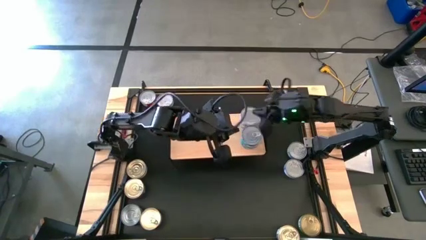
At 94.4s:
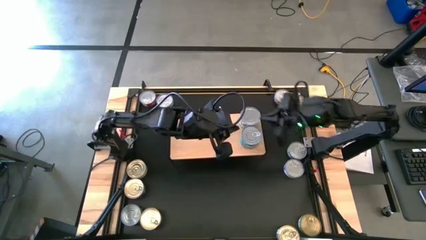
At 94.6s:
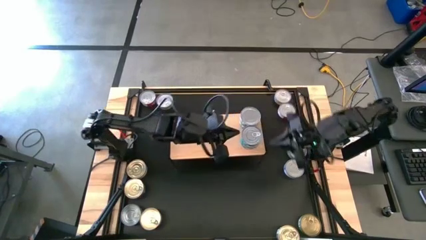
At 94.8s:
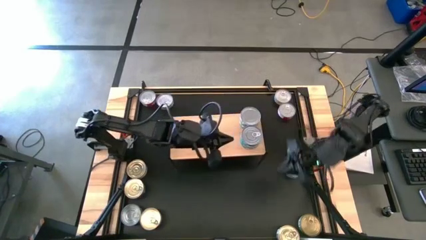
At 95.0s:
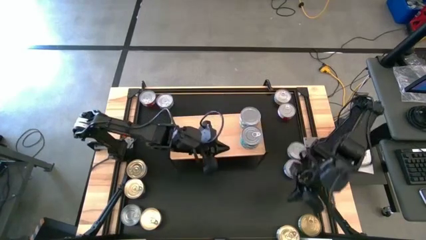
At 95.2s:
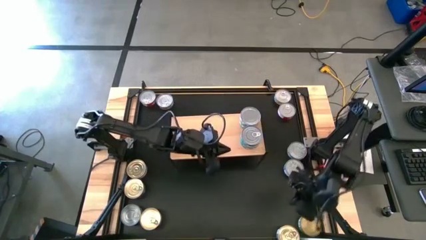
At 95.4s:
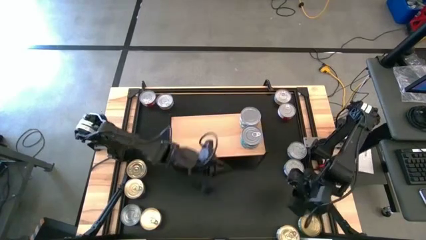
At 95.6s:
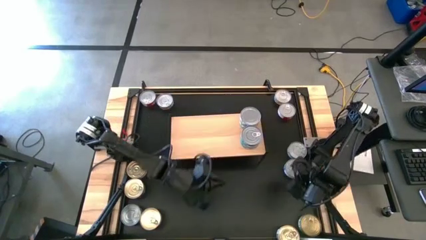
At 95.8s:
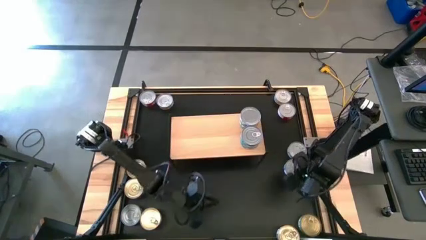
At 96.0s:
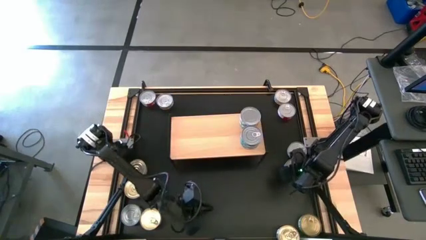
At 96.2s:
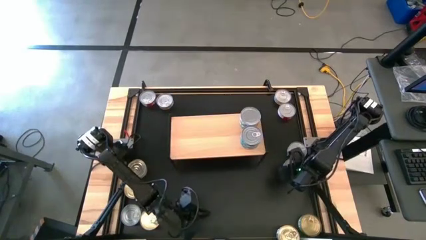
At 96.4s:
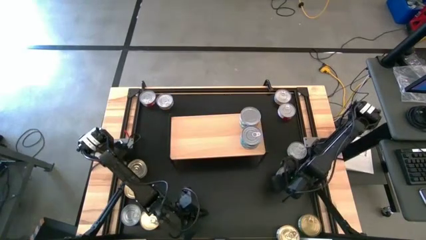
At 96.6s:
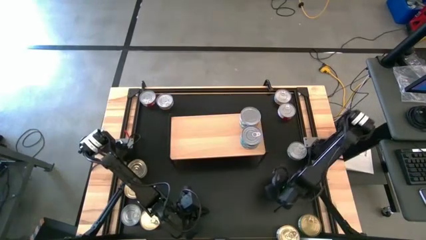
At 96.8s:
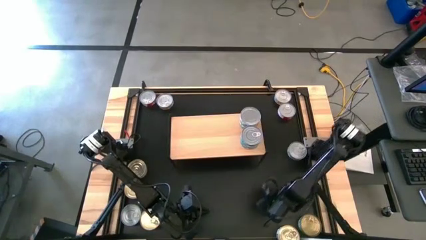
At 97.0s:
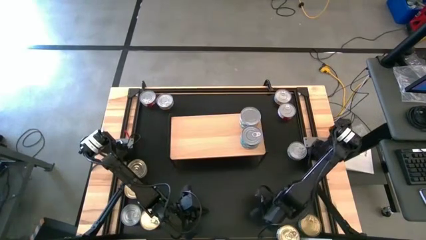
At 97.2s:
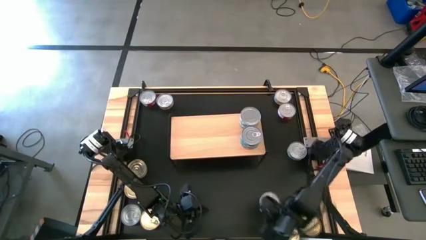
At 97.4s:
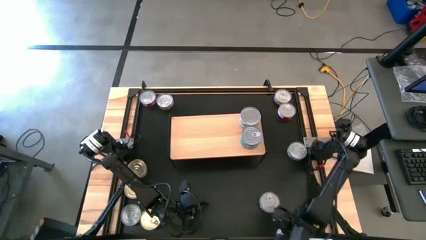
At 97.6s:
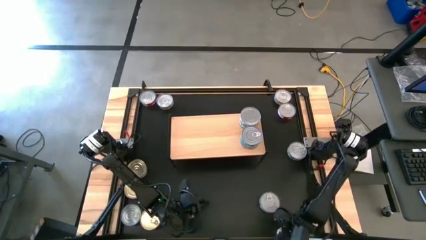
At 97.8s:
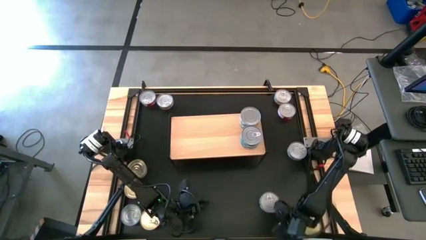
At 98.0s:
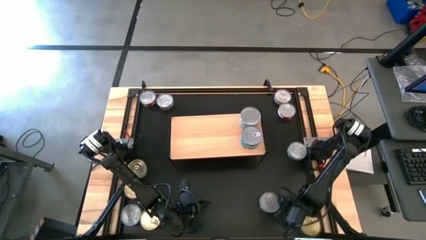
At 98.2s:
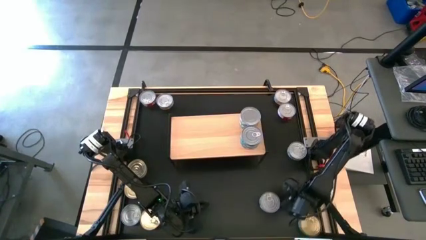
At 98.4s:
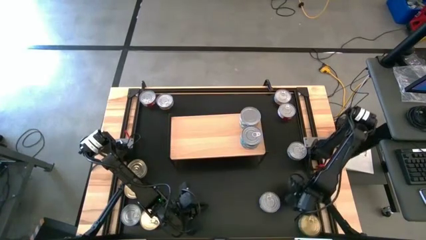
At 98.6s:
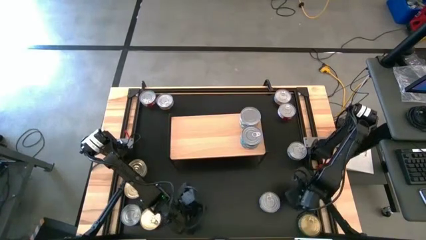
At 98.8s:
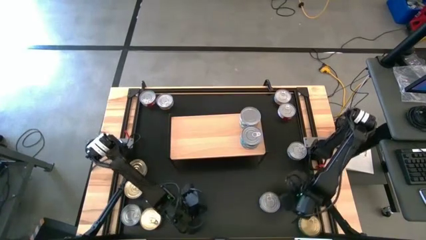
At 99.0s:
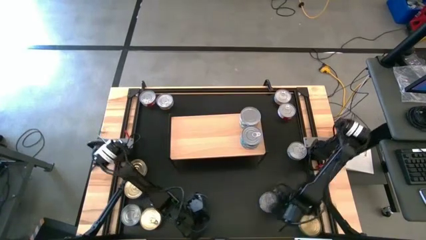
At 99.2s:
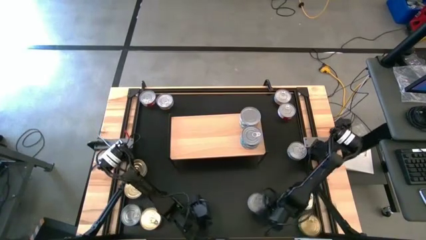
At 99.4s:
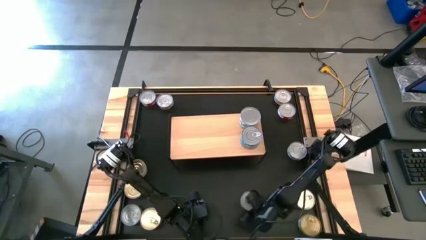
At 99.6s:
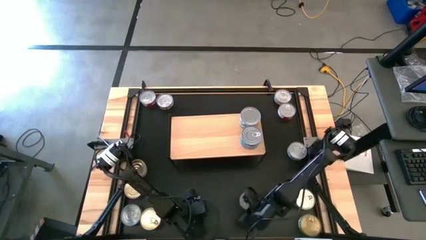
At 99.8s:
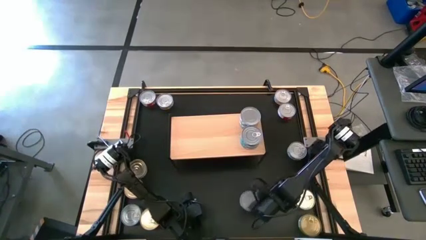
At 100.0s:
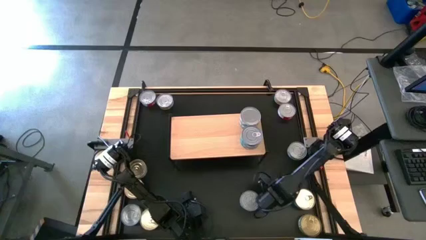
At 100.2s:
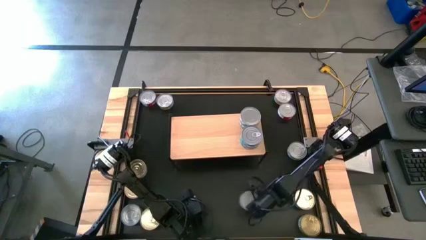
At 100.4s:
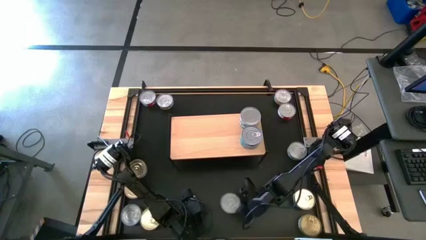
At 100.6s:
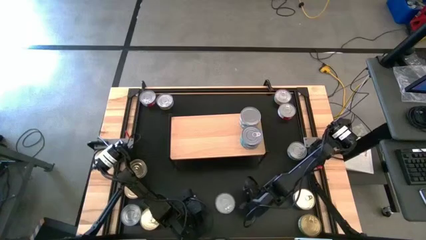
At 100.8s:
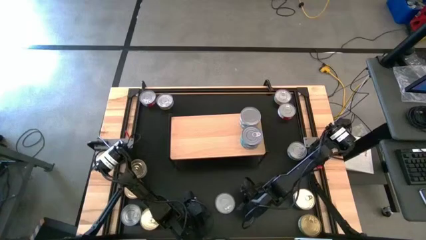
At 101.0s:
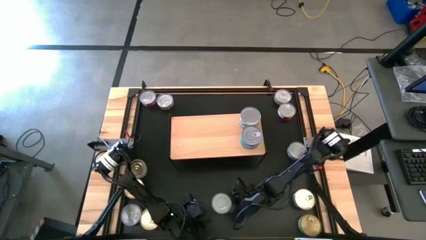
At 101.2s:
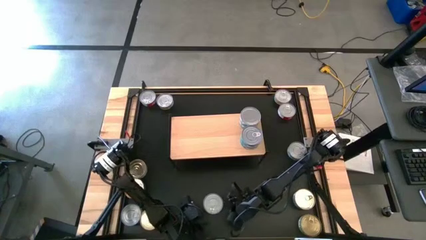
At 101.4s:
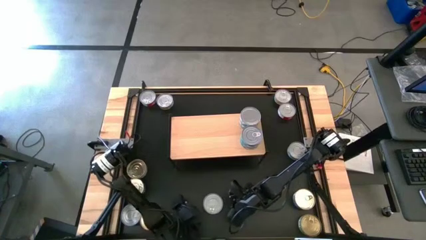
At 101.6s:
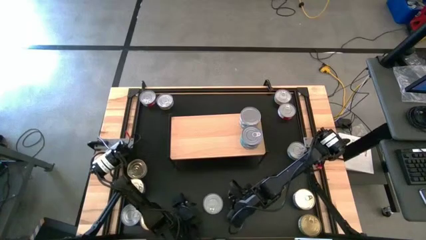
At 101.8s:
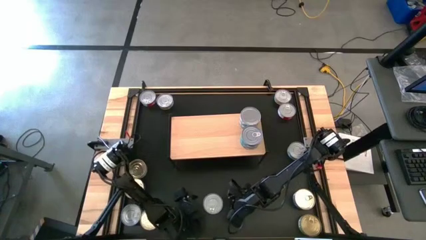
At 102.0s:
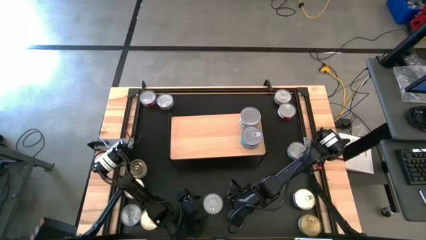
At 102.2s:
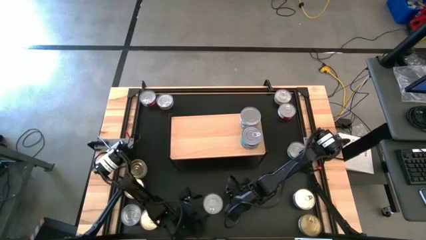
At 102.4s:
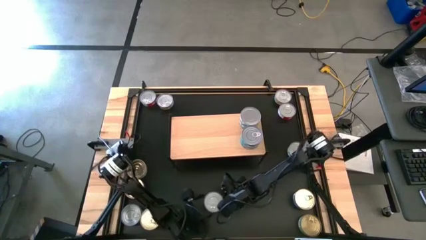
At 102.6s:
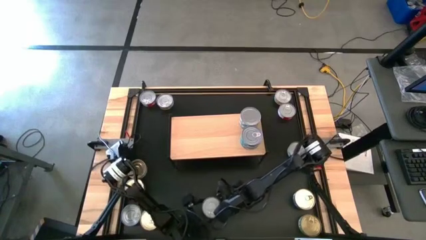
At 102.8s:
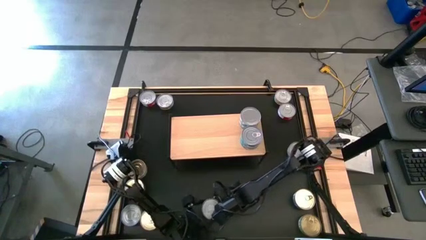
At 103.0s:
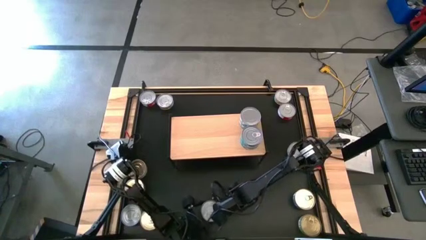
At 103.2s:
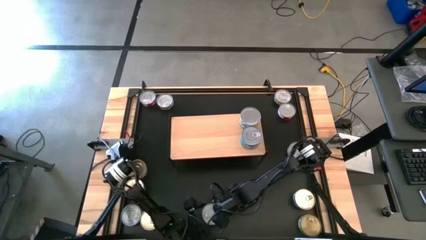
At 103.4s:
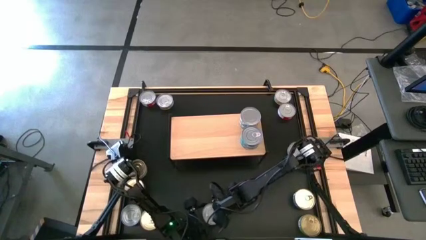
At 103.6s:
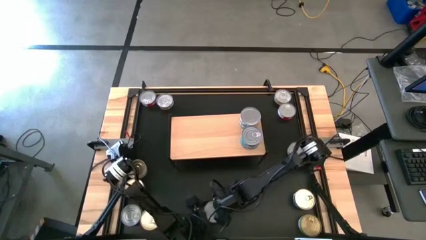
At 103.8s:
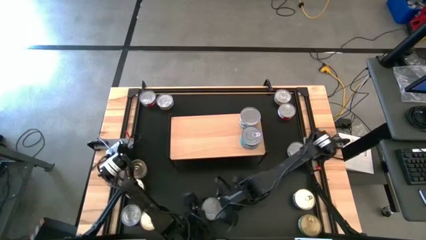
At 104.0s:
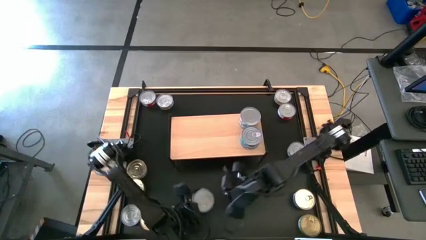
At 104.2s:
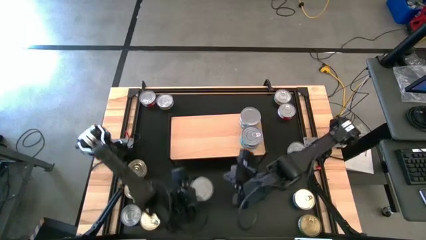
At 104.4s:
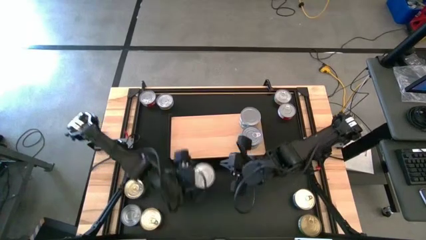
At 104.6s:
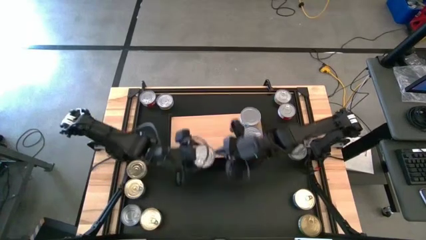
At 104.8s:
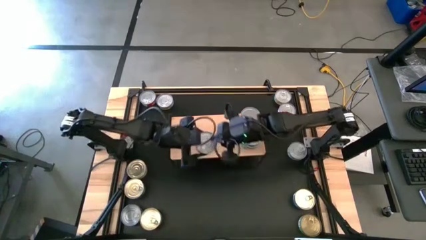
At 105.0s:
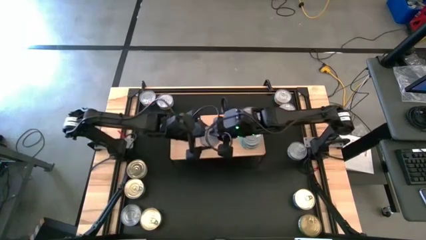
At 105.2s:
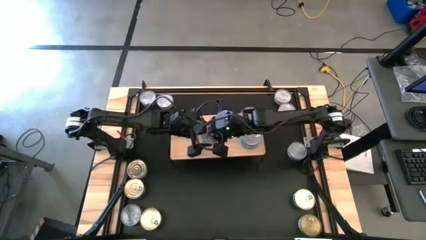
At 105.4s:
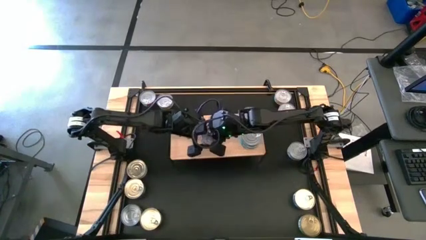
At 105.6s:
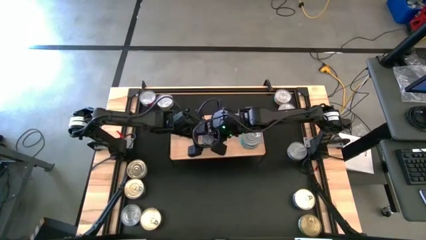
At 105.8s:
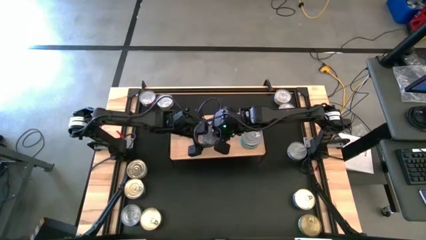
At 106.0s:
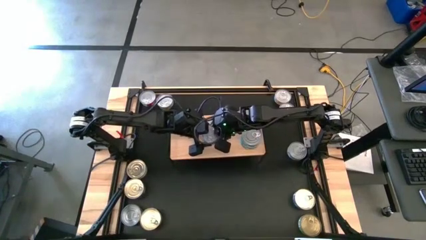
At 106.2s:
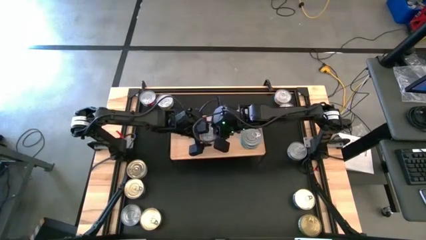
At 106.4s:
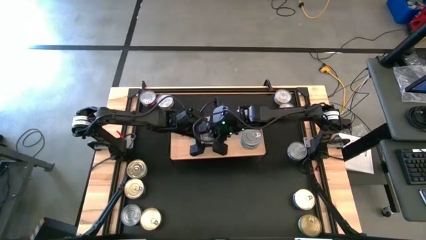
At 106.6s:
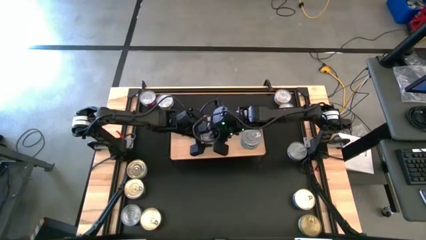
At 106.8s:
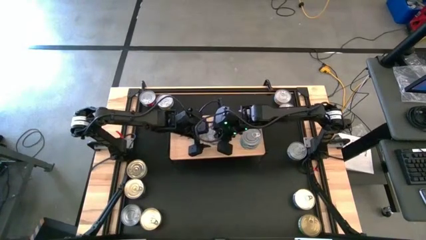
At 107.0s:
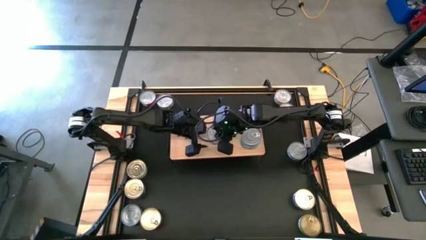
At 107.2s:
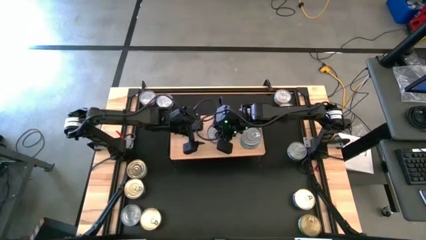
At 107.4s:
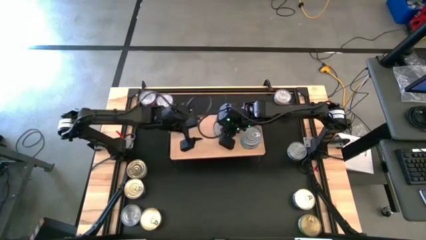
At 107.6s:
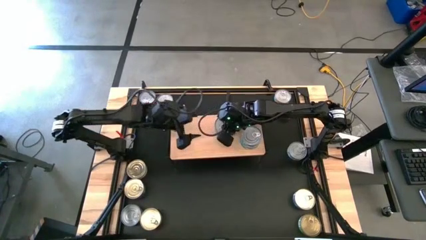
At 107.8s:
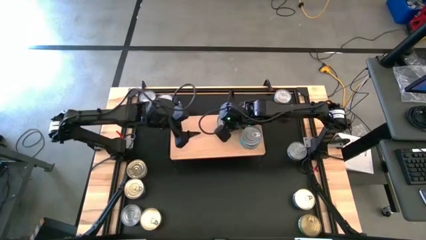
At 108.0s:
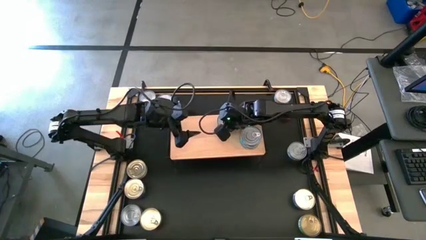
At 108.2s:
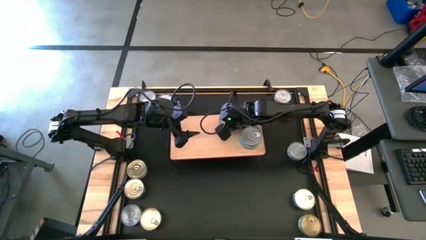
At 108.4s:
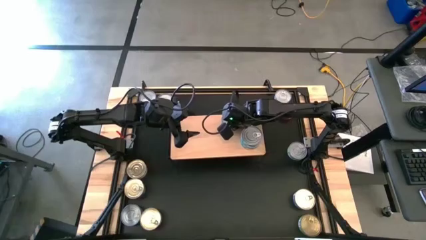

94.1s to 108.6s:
Task: Stack canned seafood by type on shelf
Put the blue tuna can on the shelf

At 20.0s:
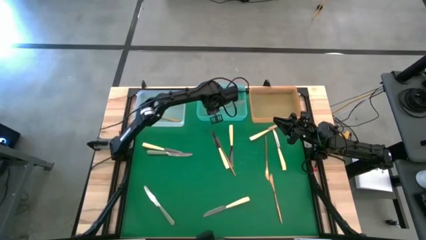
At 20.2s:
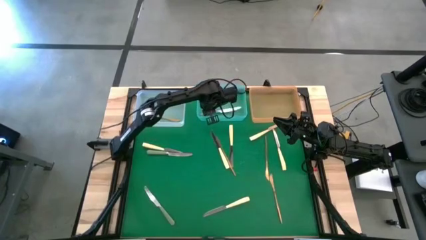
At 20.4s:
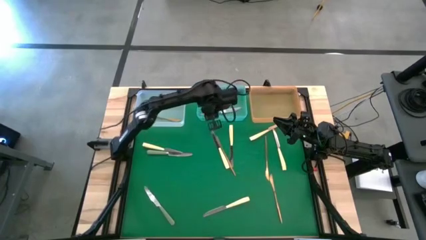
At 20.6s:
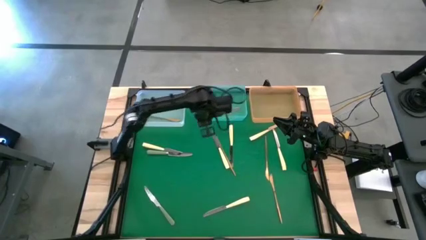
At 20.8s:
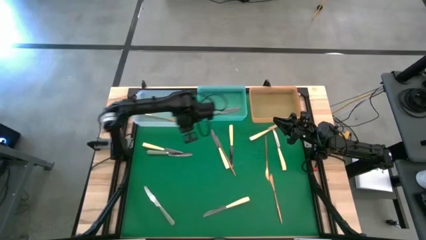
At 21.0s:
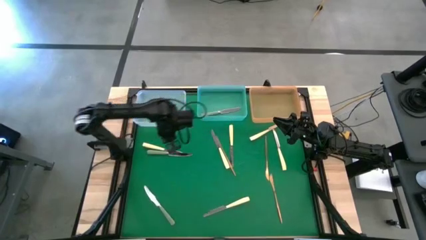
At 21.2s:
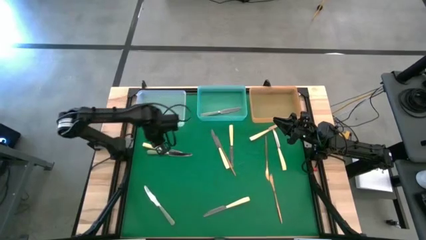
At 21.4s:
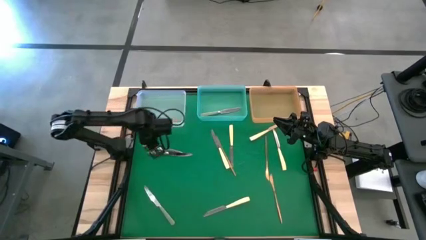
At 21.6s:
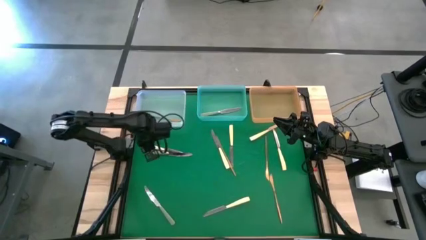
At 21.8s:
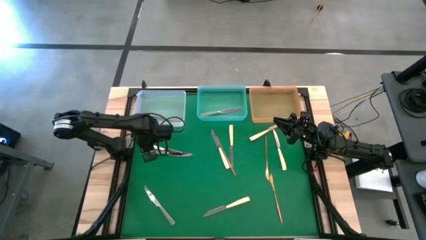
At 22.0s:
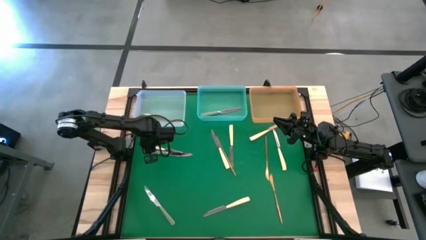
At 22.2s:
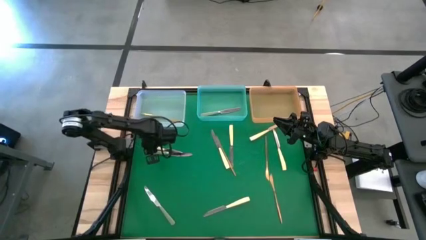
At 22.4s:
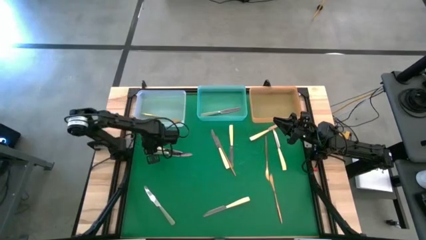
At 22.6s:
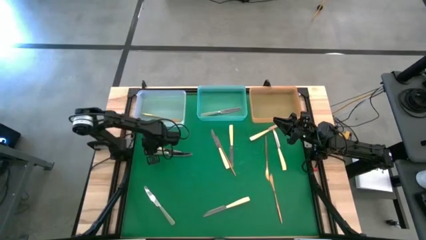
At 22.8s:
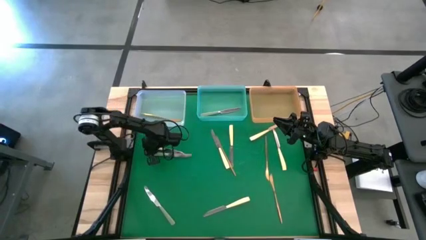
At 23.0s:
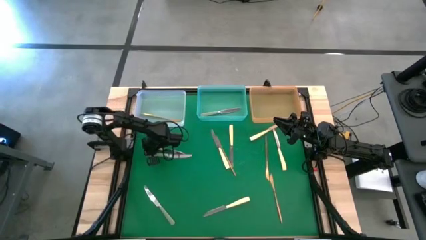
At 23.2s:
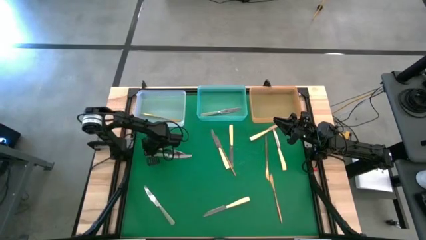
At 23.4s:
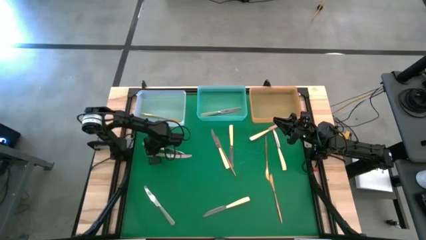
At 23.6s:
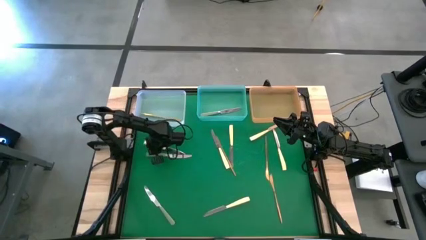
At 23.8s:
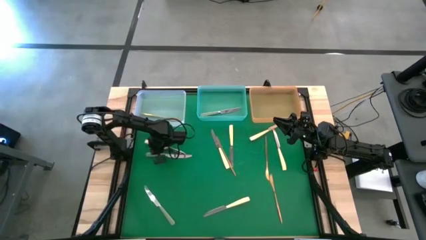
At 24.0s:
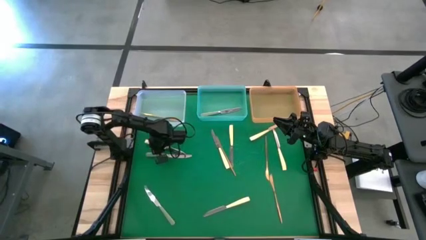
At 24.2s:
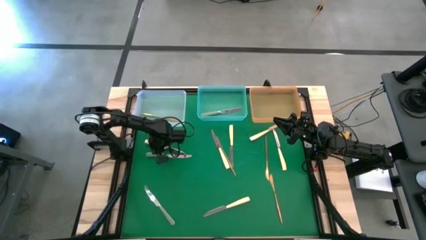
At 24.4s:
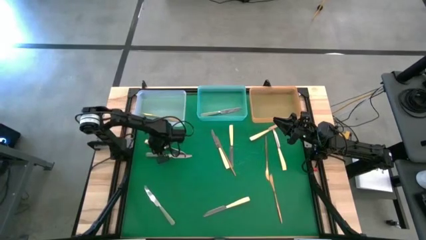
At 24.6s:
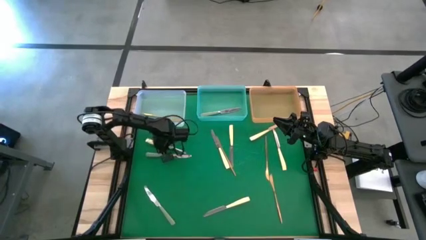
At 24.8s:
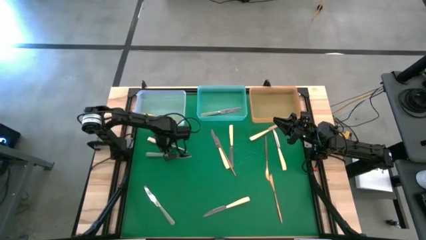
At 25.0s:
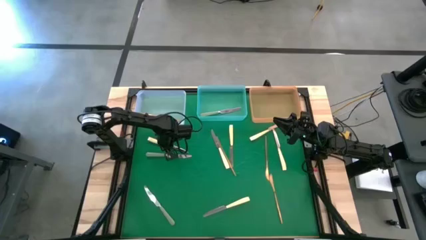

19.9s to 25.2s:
Task: Sort silverware by color (type)
Put the yellow table knife into the orange bin
